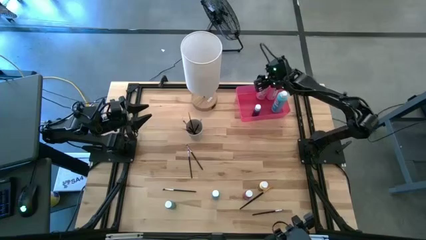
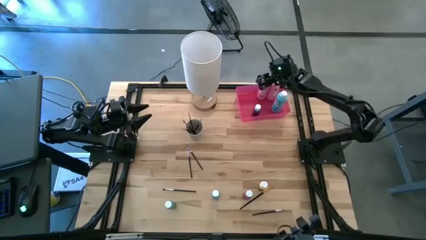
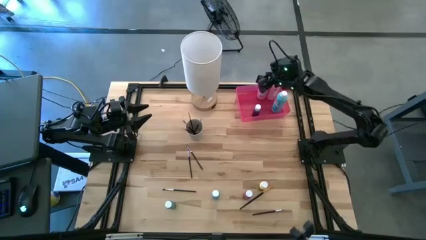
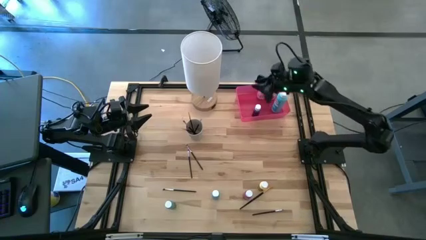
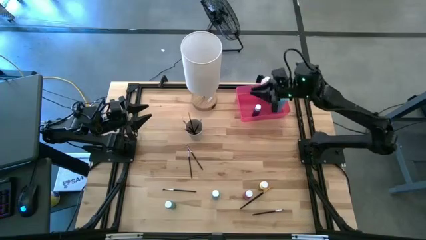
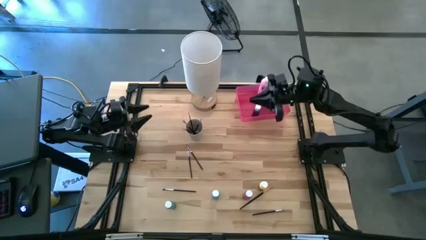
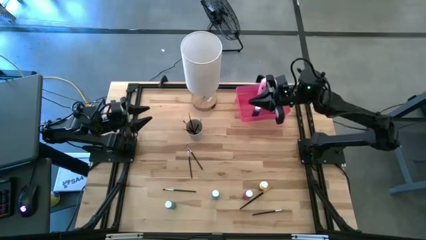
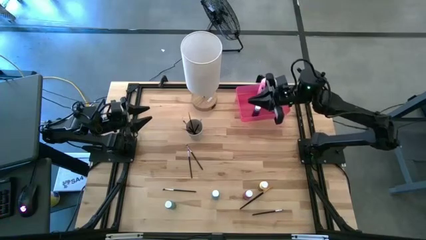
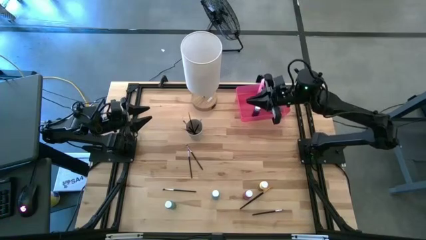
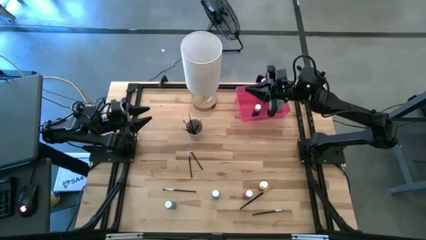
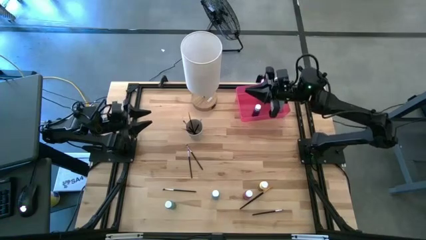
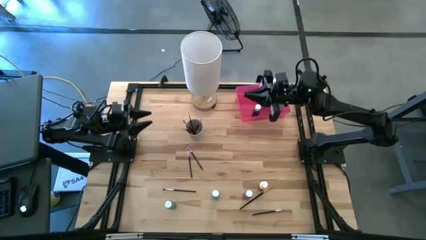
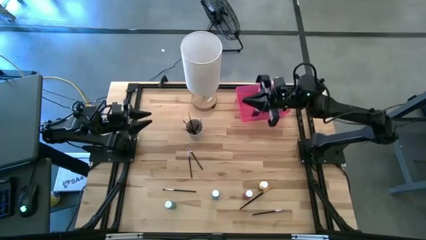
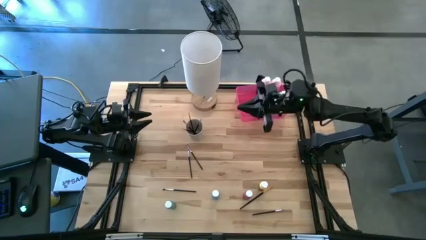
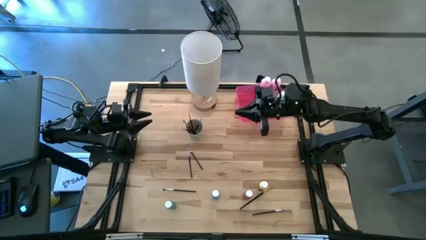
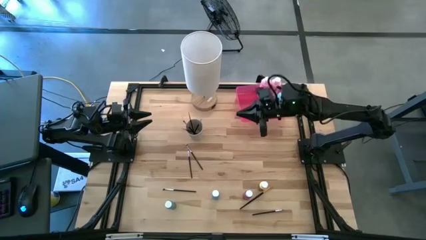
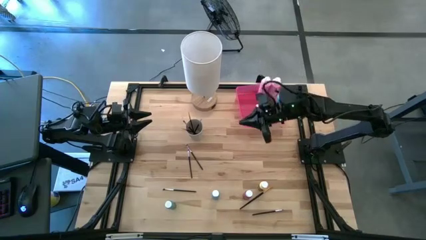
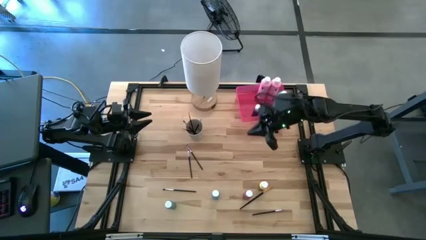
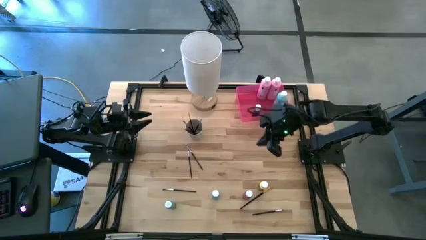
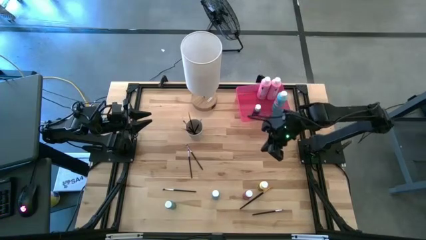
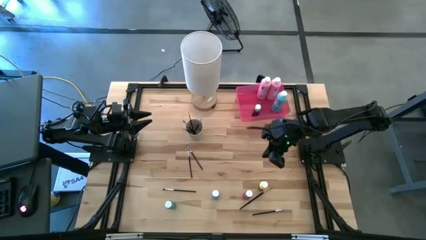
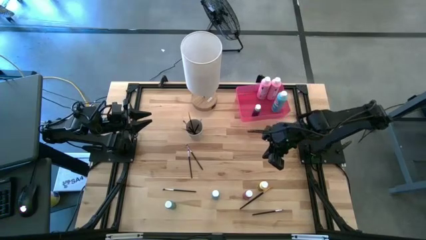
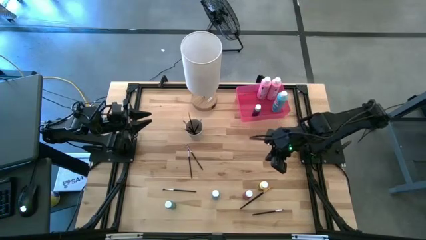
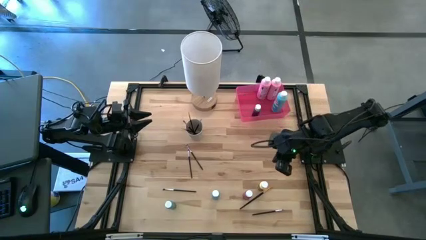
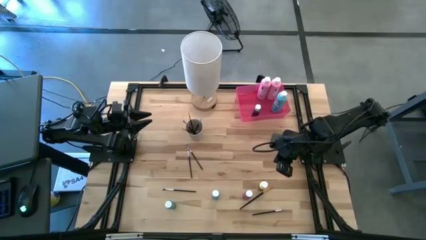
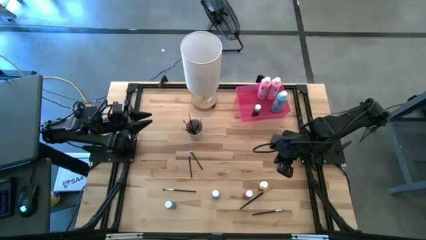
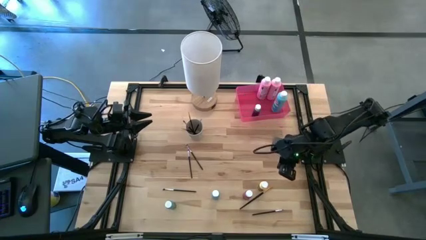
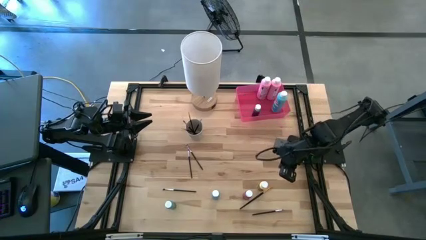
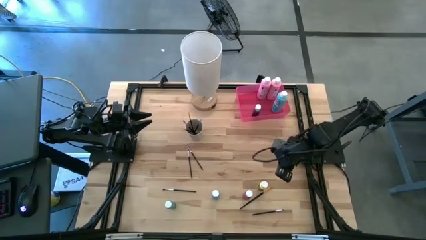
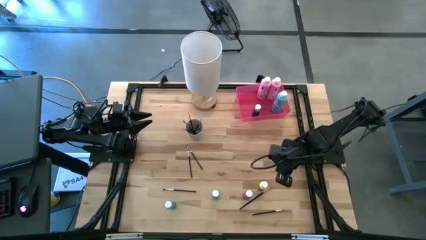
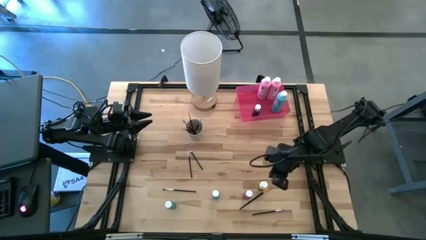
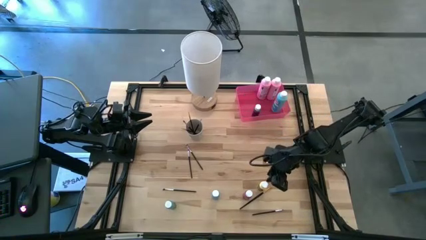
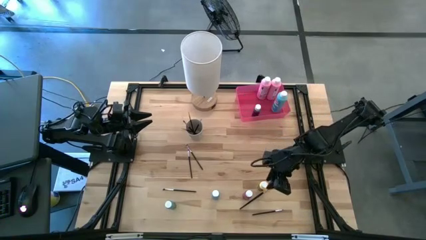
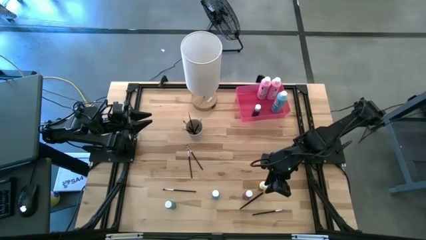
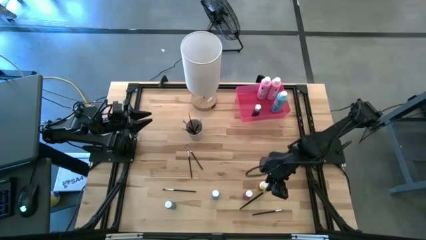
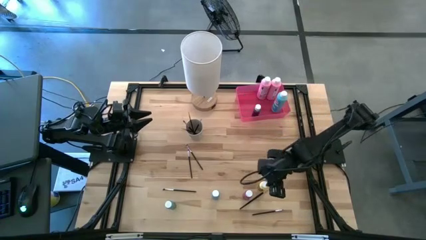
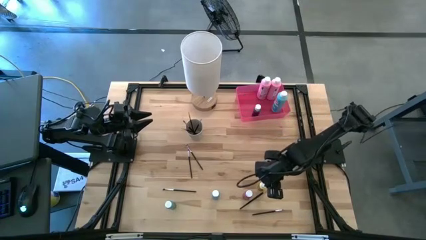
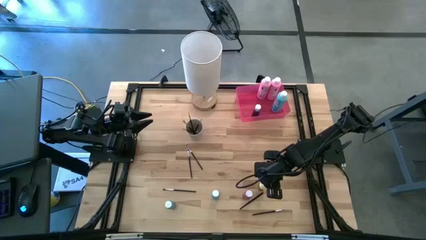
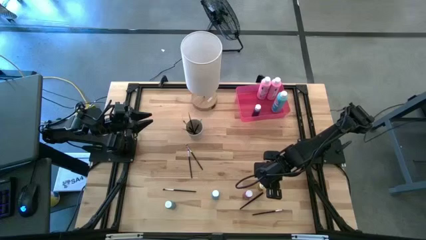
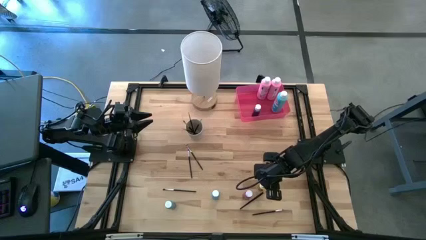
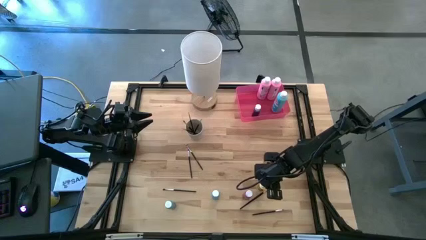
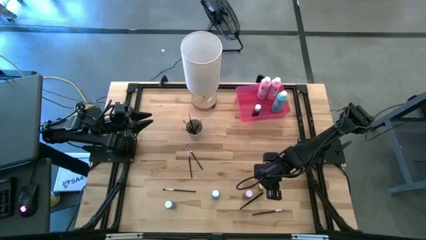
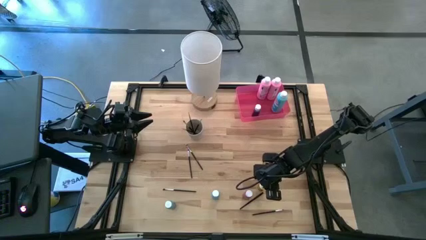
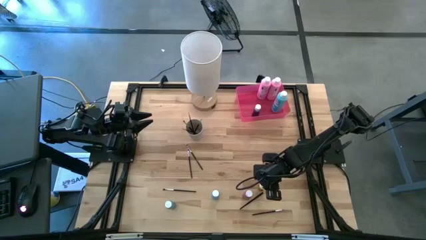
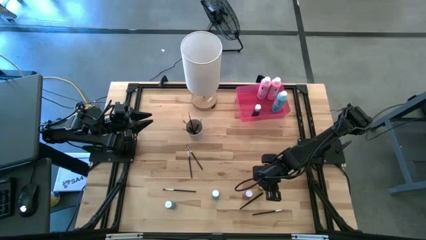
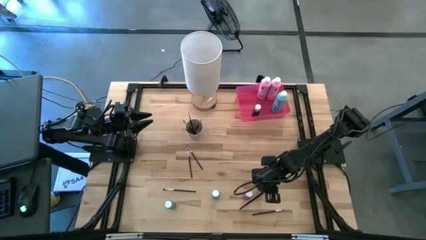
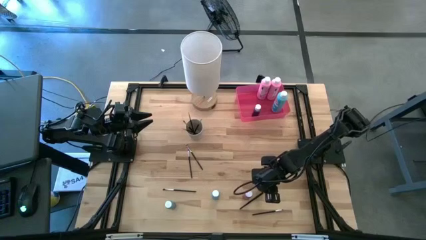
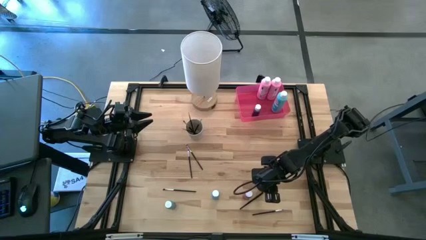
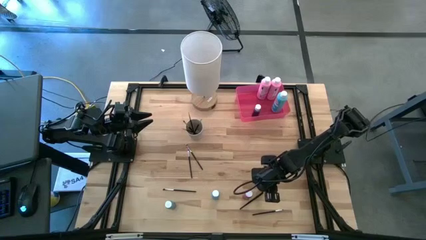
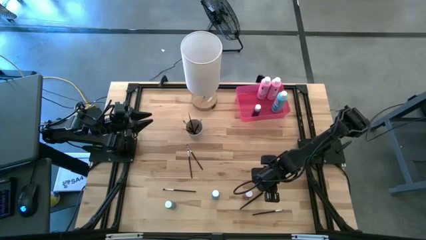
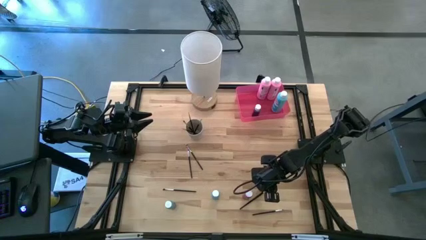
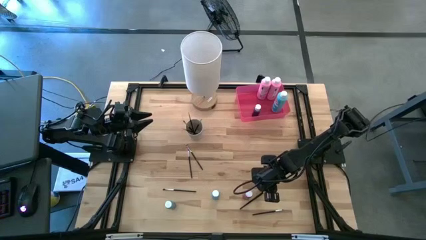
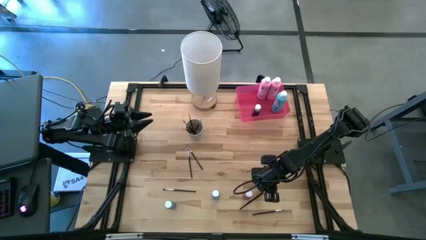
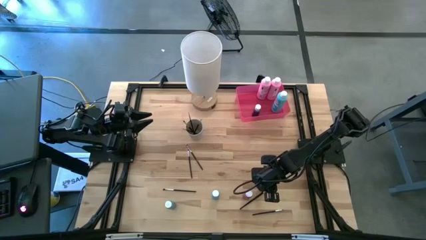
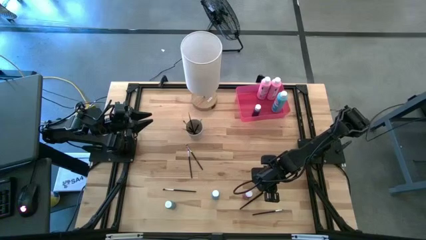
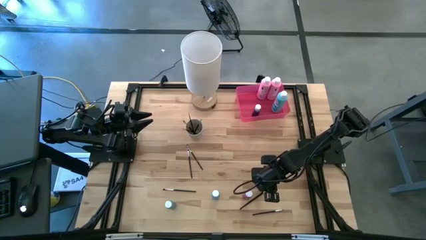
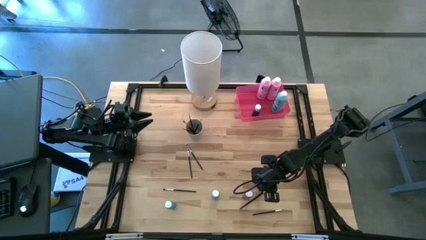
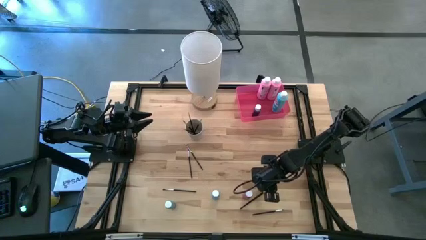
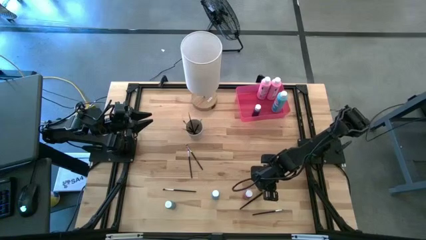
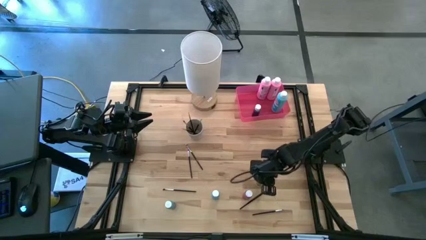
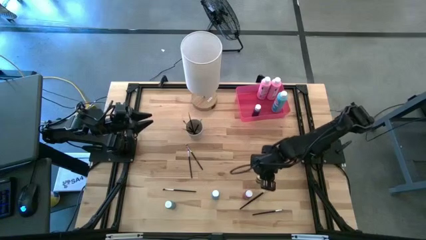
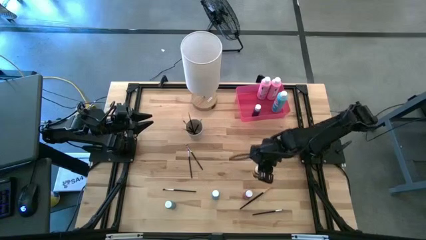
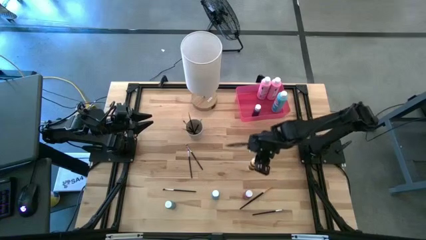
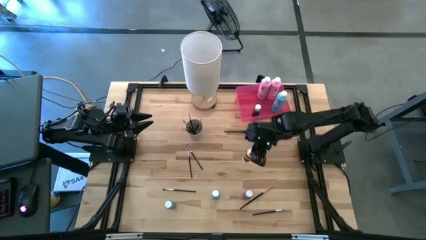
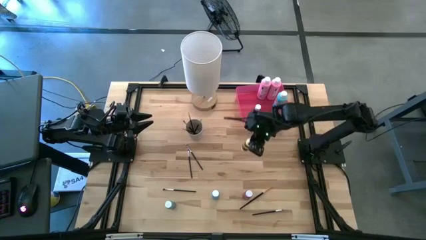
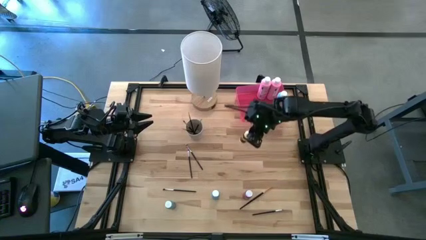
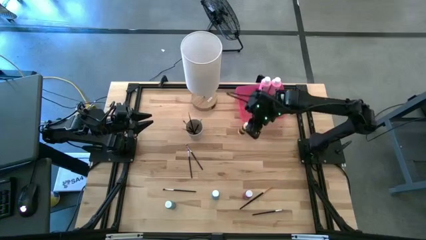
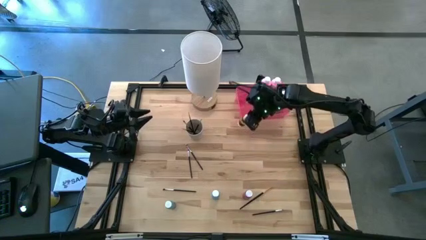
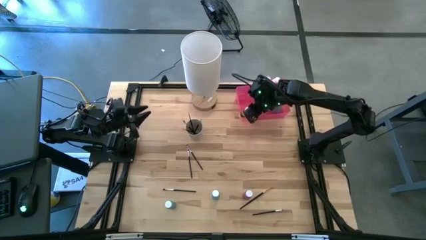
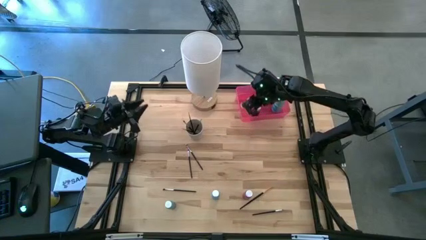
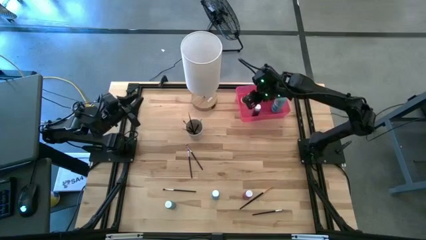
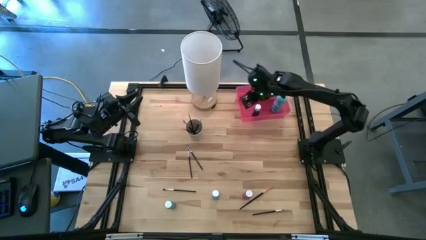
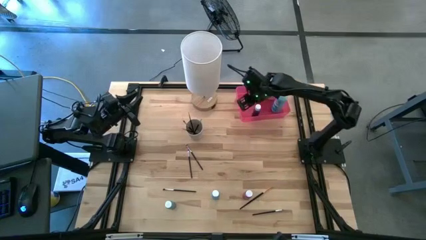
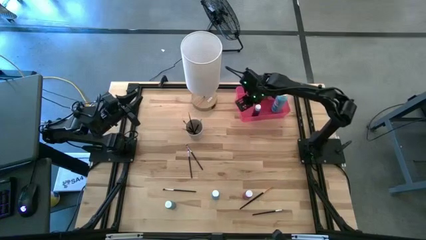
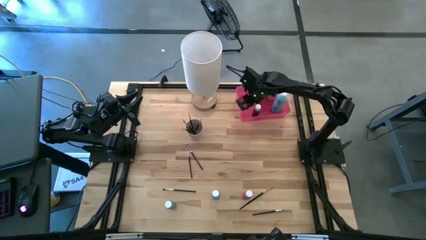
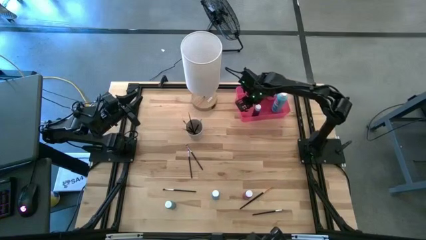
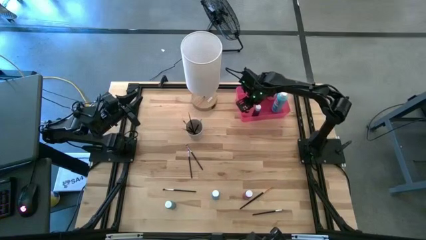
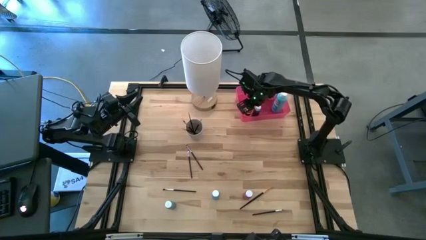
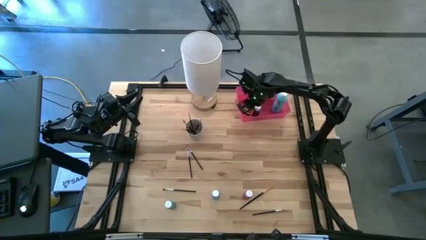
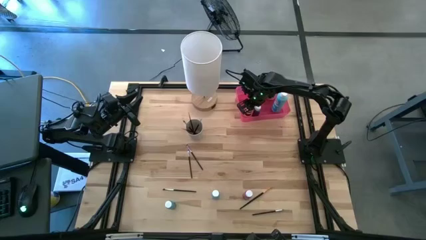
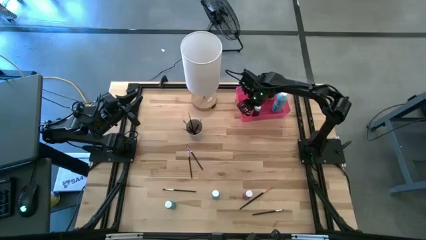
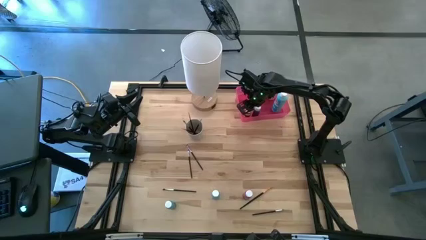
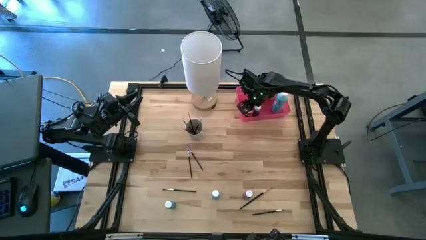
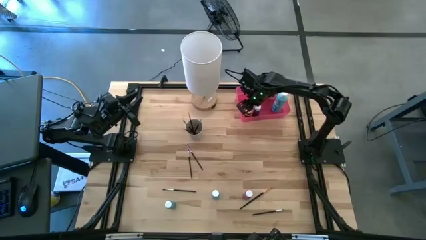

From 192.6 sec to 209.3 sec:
Task: Pick & Place Paint Supplies
Put the small yellow paint bottle into the pink bin
